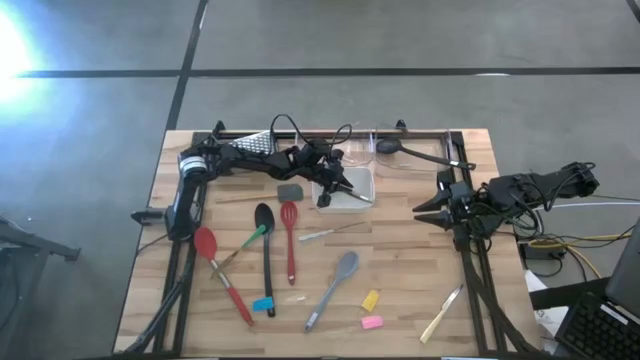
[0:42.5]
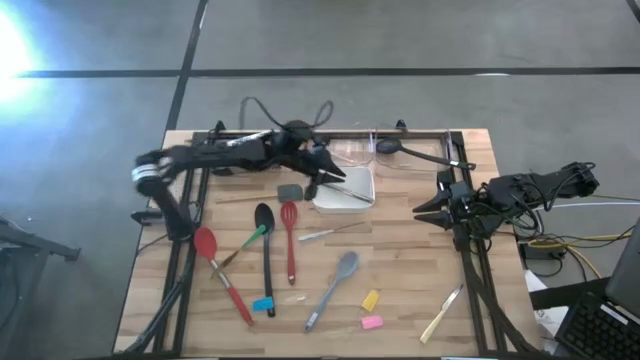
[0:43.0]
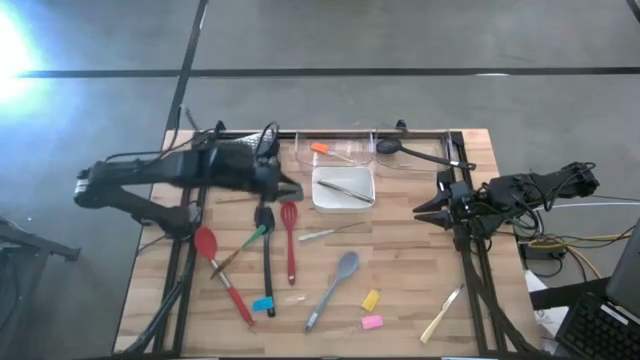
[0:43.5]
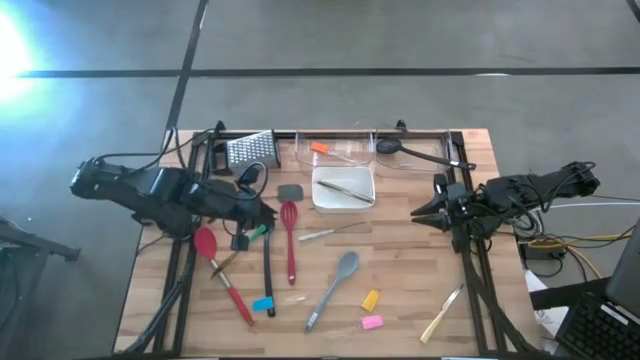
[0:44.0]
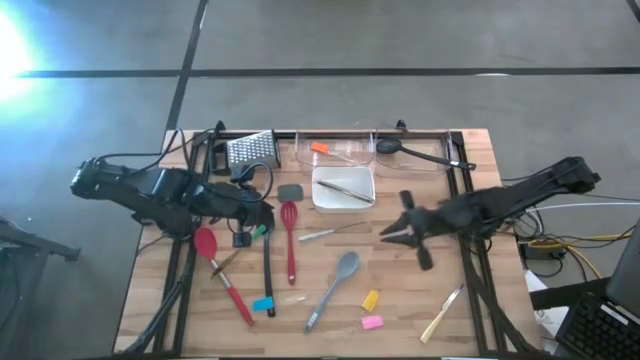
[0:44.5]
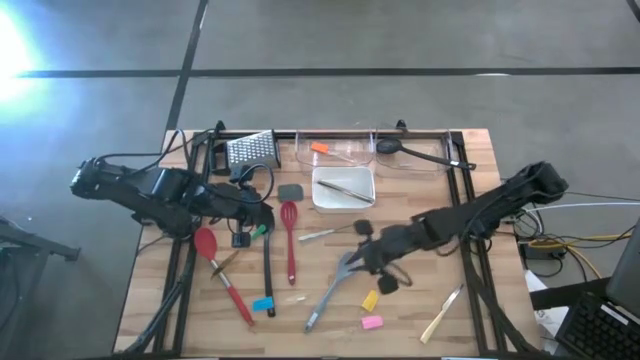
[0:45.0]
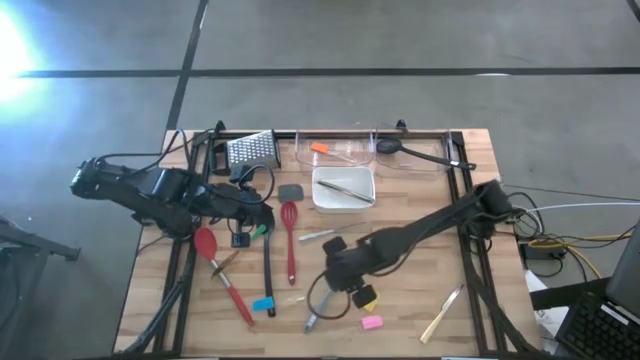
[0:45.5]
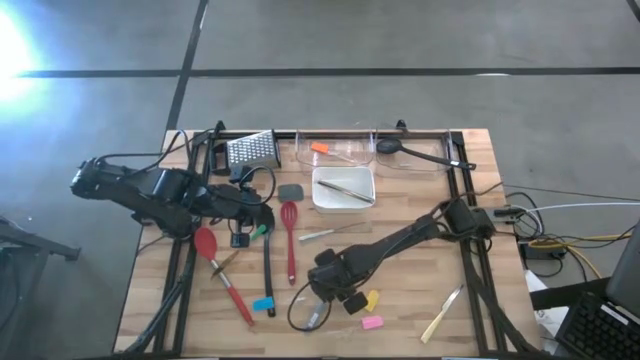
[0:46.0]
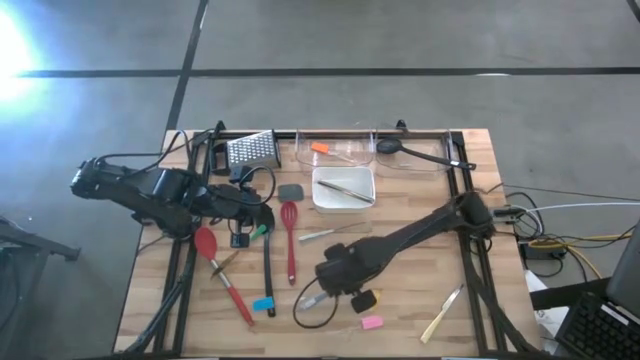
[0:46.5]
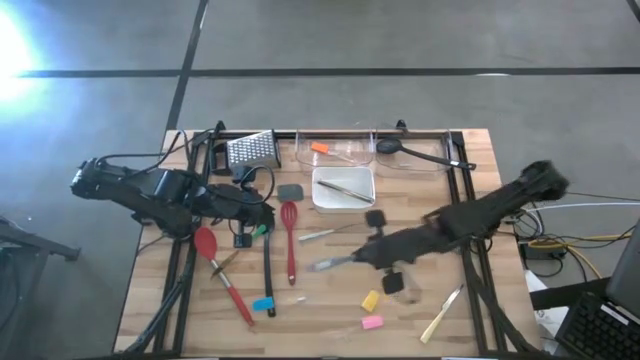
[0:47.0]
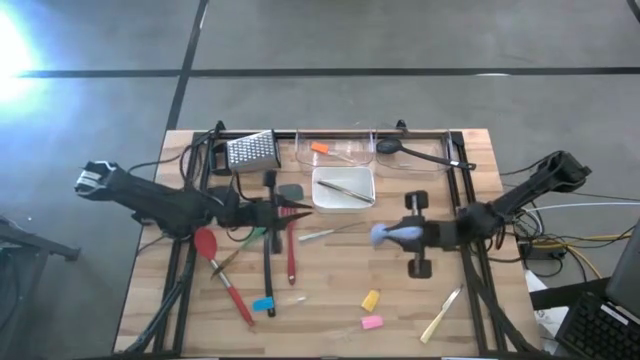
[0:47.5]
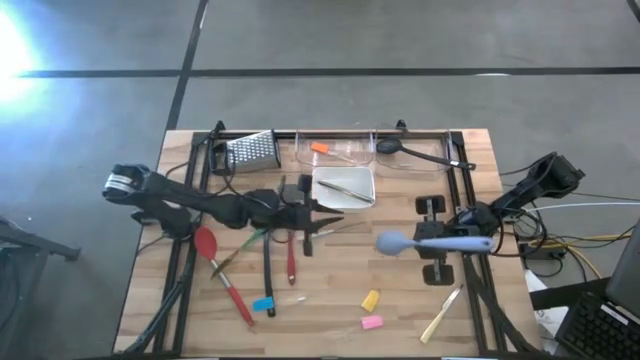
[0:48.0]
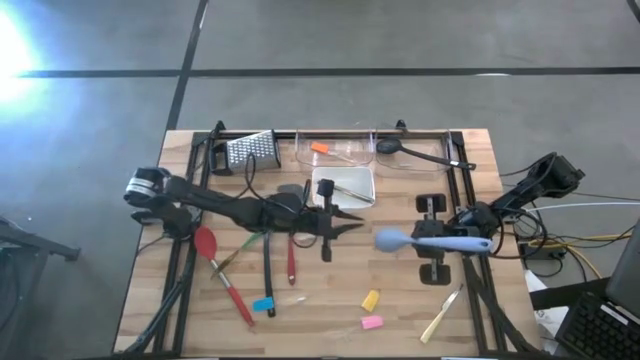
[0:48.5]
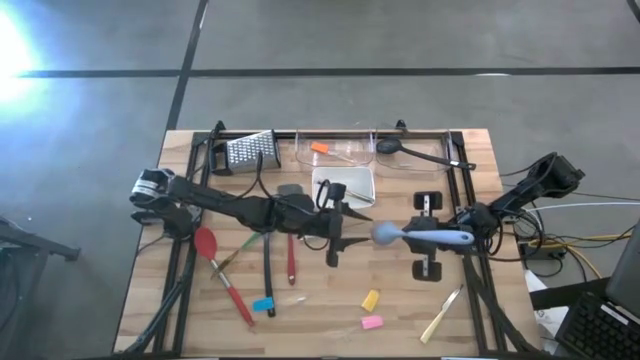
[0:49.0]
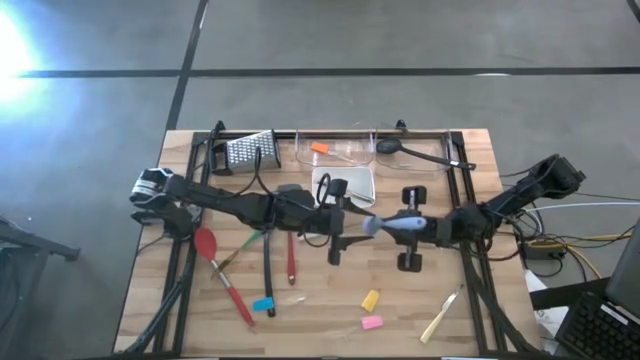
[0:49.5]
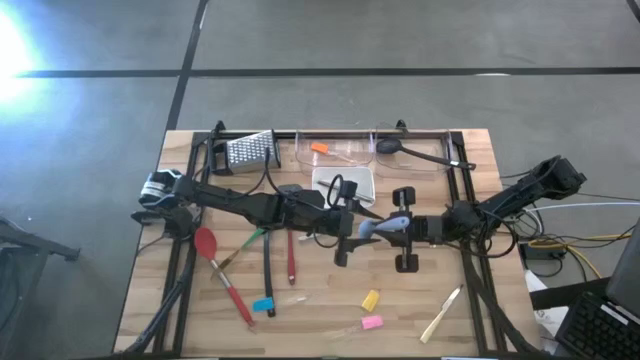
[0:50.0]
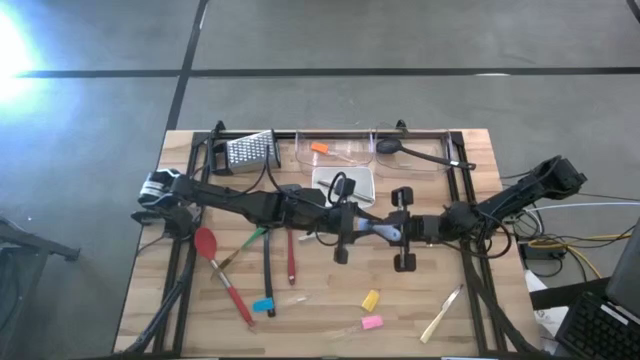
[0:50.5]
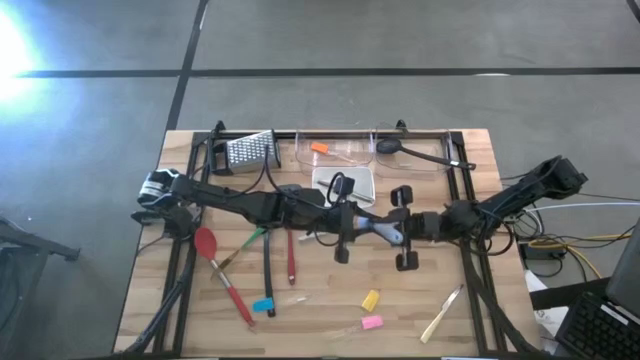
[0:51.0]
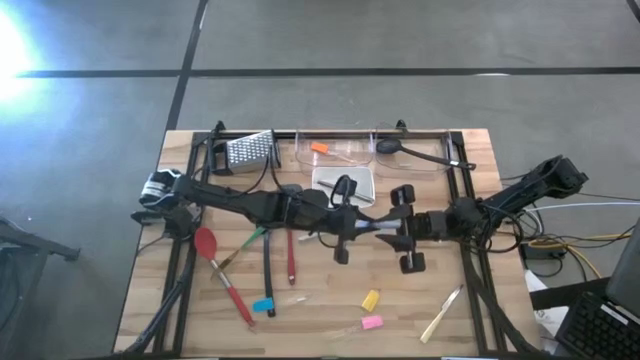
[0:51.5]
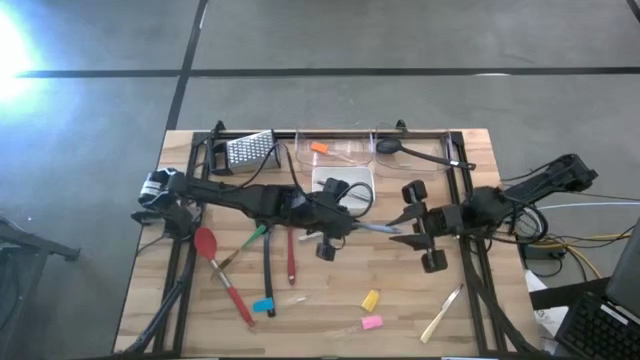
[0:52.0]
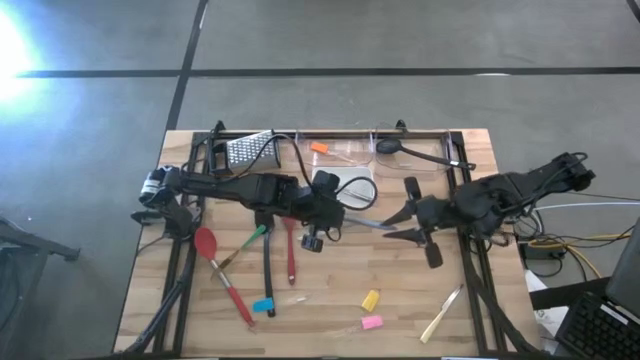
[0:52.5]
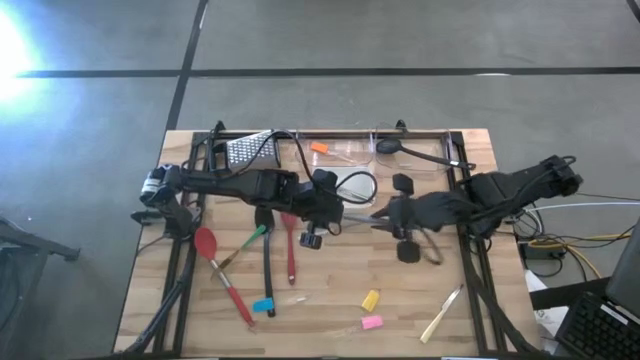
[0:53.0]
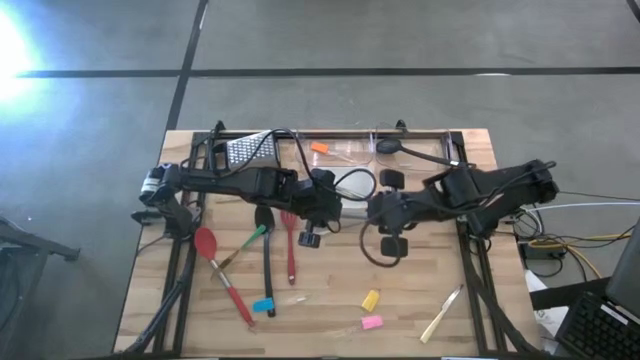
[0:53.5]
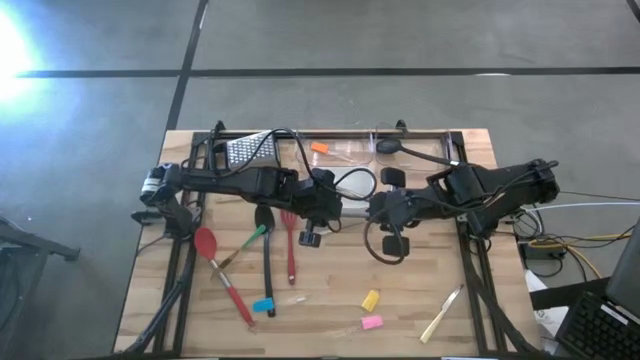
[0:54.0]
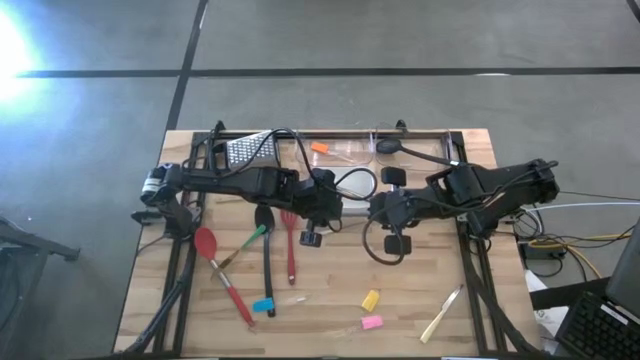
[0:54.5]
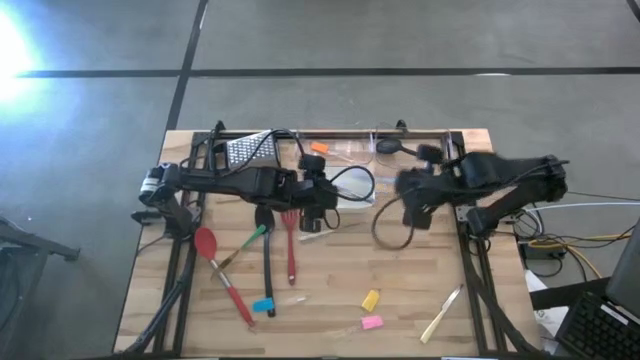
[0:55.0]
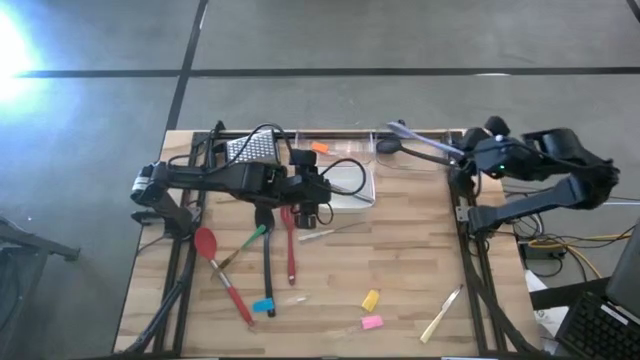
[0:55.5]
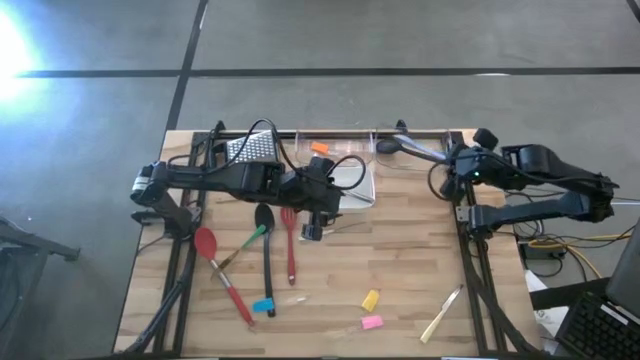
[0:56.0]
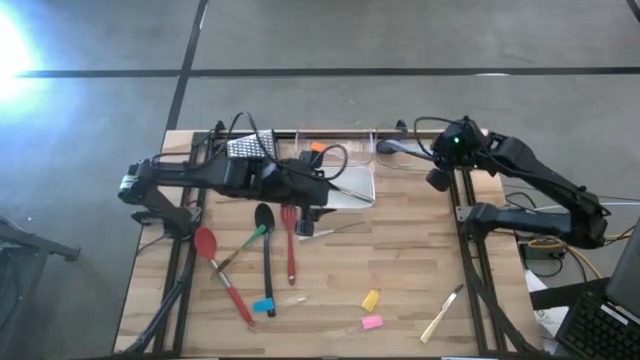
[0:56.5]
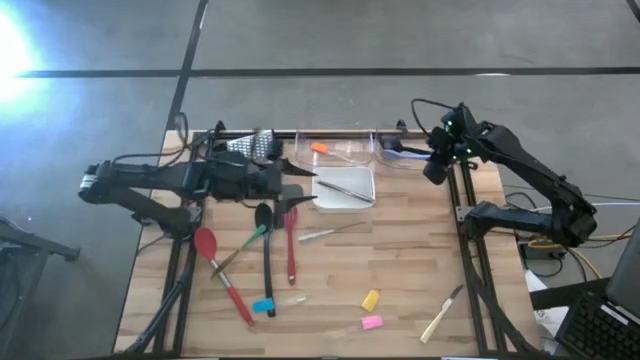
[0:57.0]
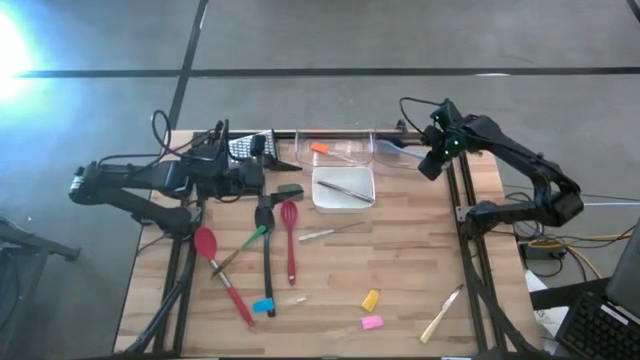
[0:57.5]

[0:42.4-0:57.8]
Task: Pick & Place Kitchen Items
Put the gray serving spoon into the right transparent bin

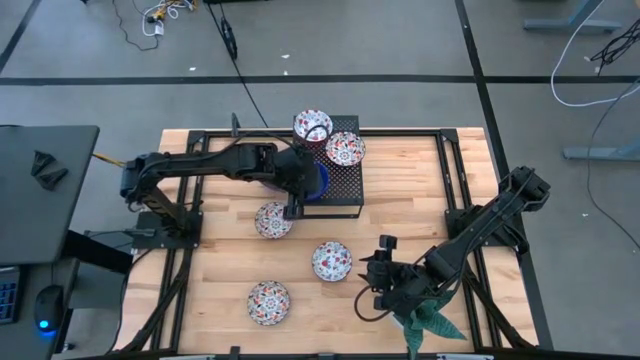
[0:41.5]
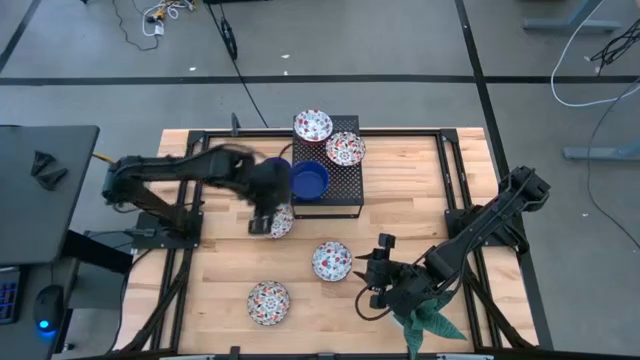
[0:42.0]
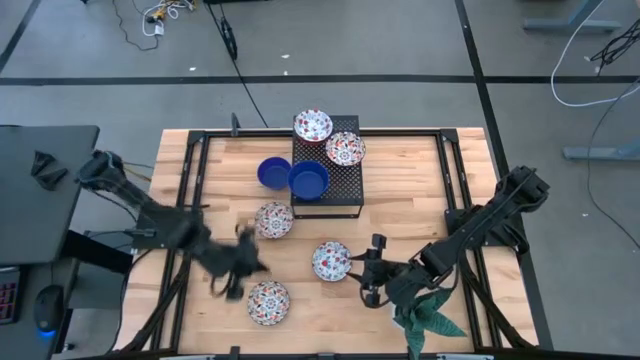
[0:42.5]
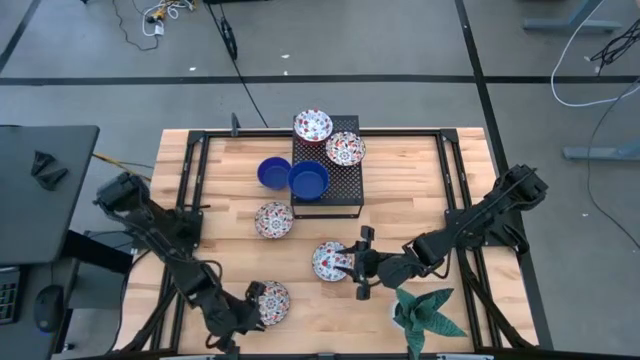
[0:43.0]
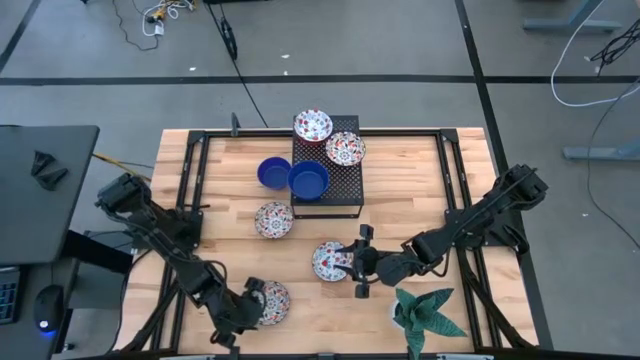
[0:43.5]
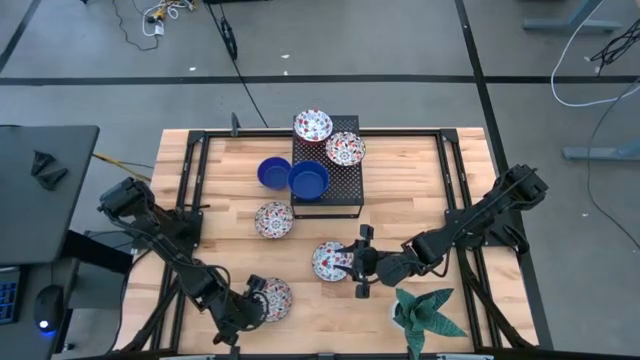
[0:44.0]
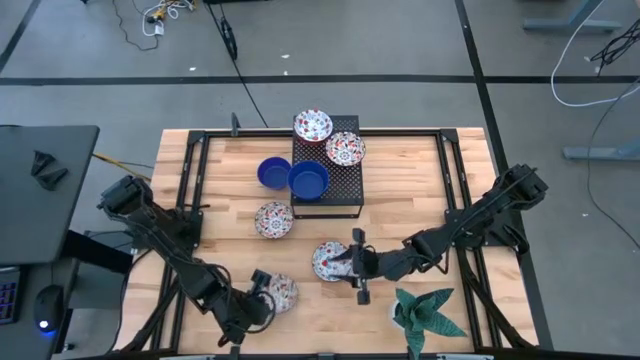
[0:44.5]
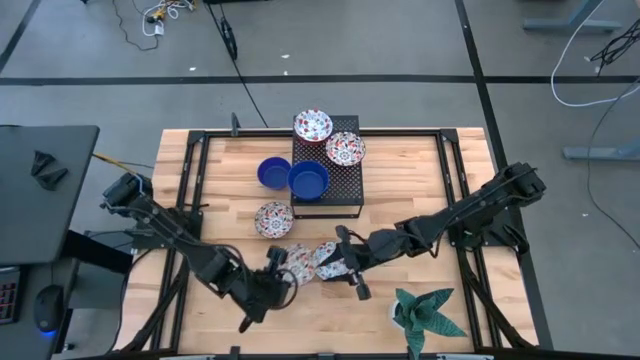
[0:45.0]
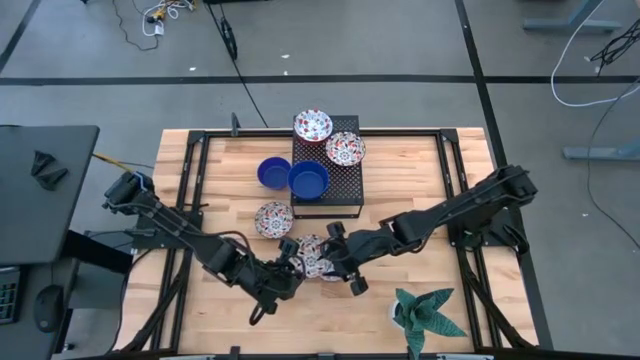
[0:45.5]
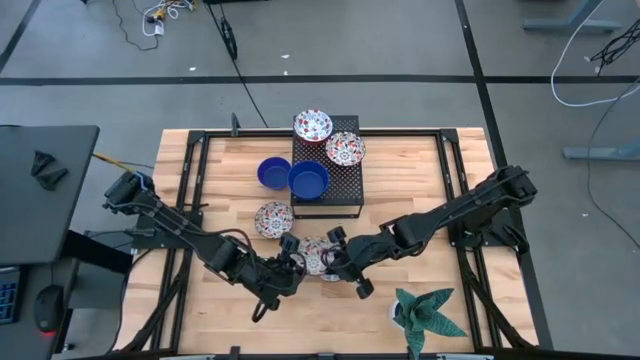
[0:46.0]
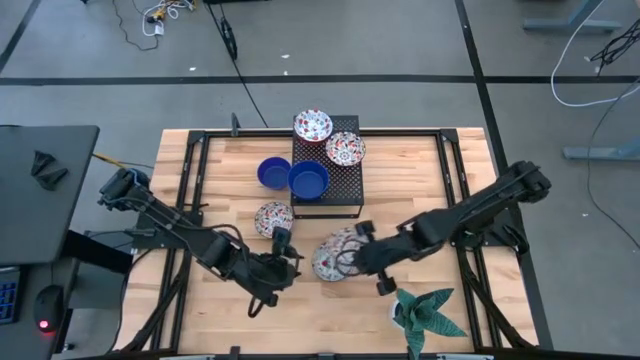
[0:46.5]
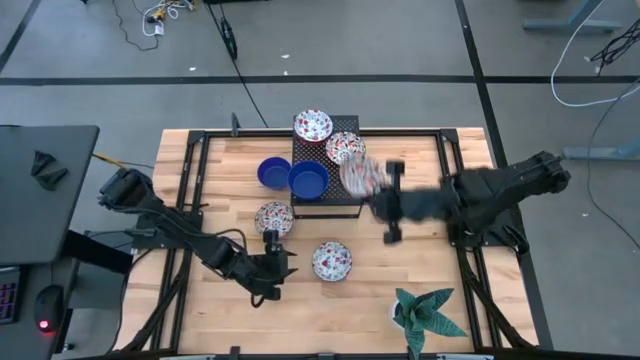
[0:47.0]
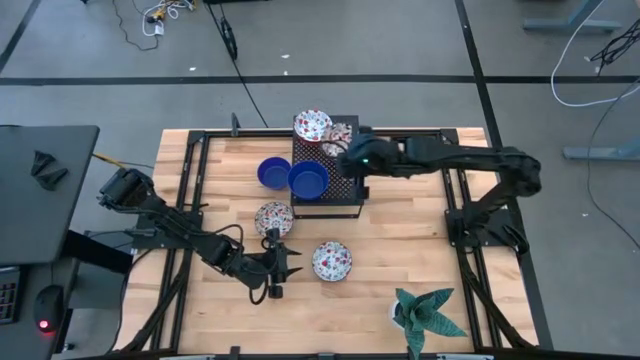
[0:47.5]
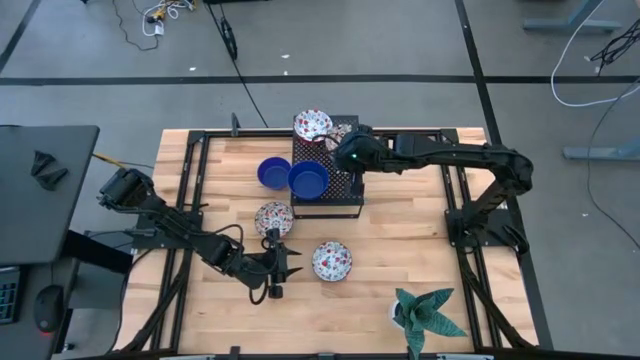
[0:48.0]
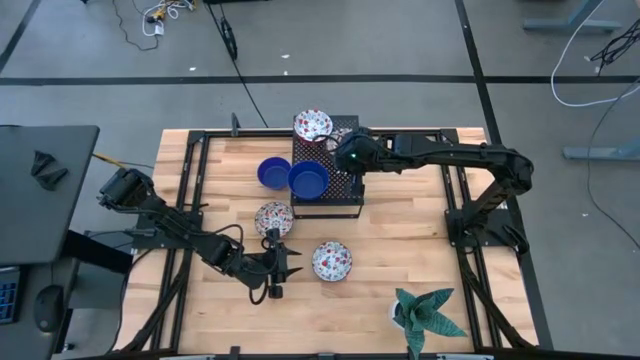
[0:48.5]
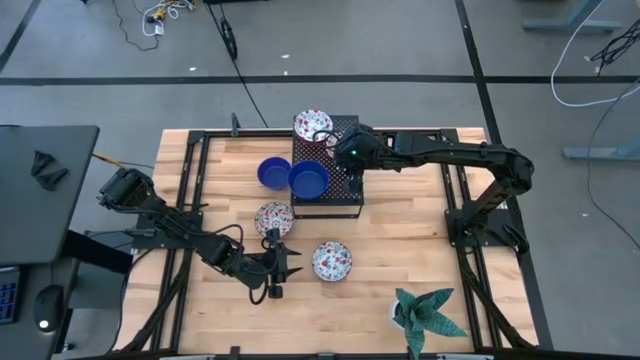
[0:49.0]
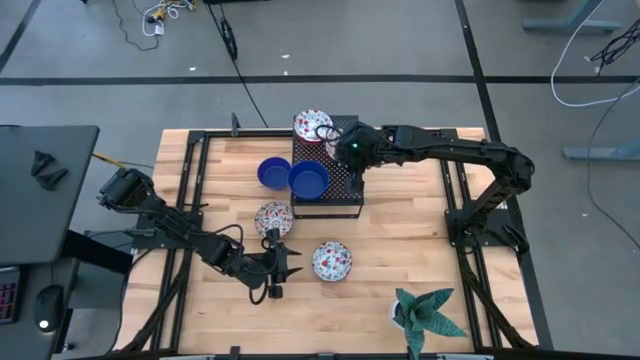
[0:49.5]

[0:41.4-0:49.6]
Task: Pick & Place Mini bowls
Stack the bottom orange patterned bowl on the orange patterned bowl on the shelf
